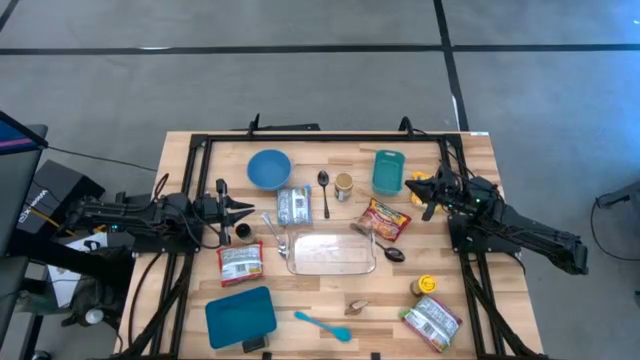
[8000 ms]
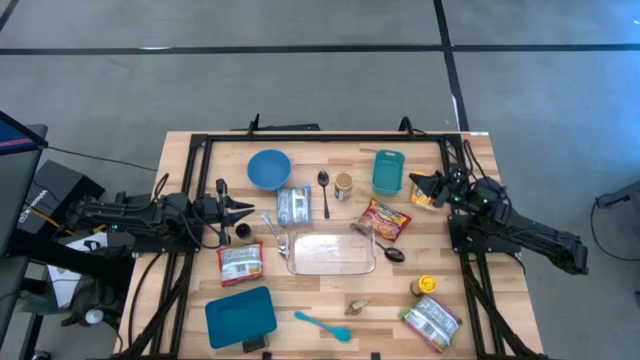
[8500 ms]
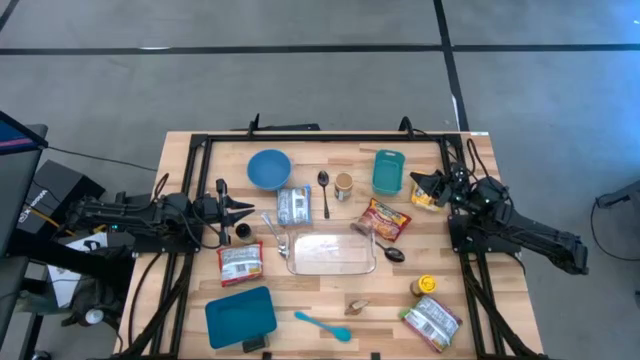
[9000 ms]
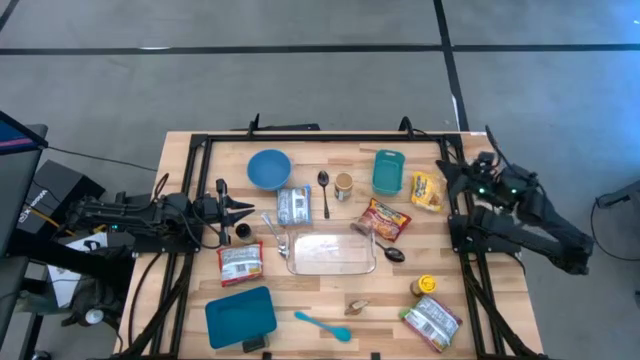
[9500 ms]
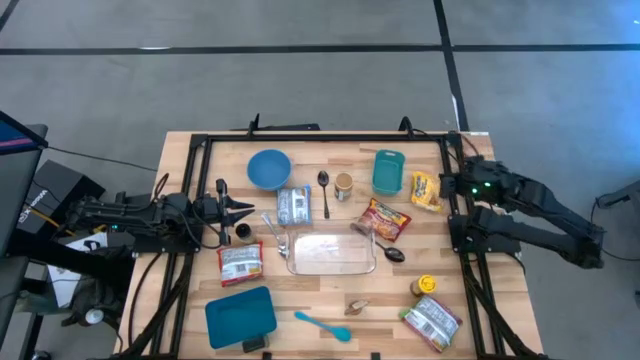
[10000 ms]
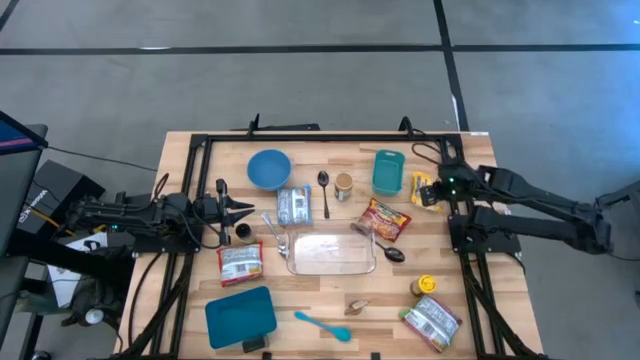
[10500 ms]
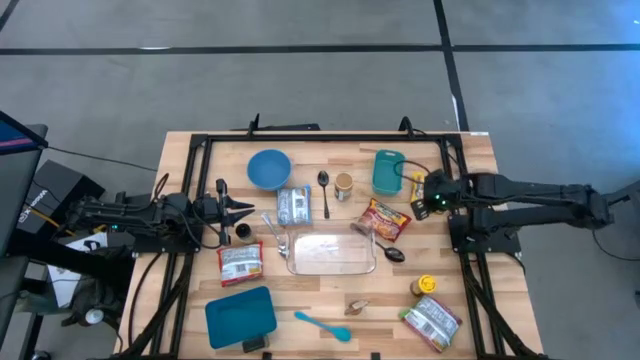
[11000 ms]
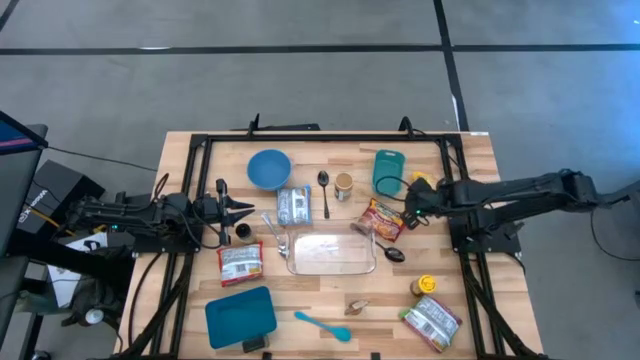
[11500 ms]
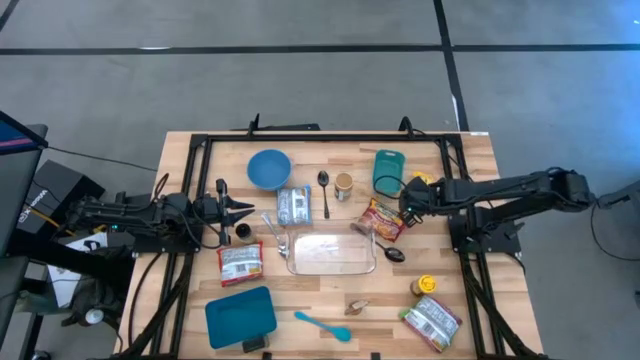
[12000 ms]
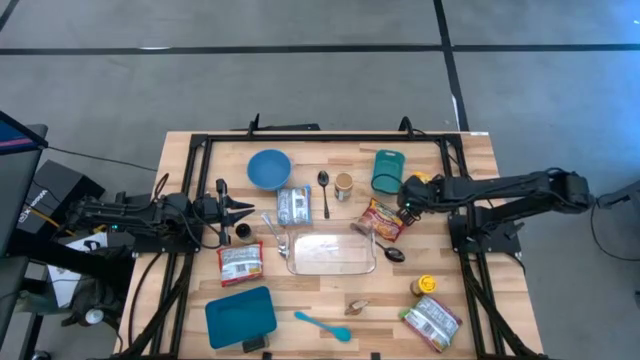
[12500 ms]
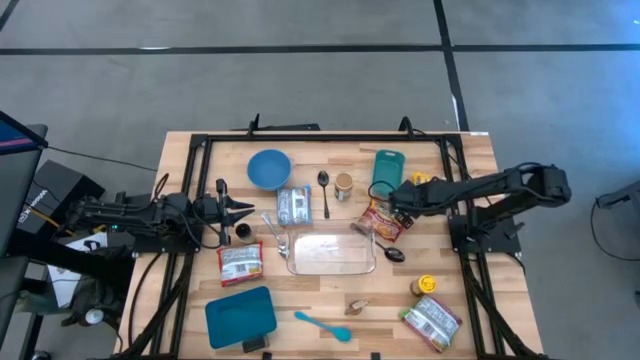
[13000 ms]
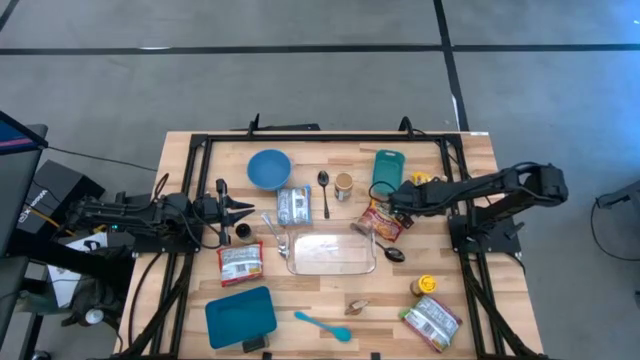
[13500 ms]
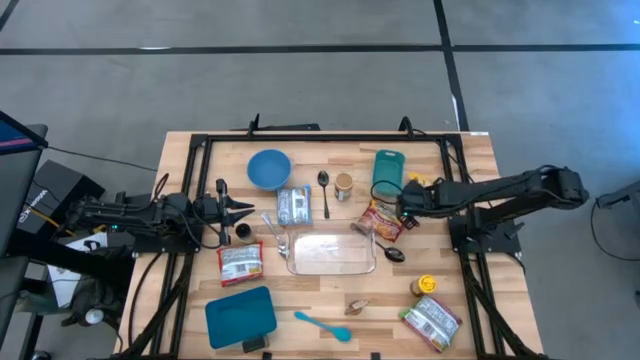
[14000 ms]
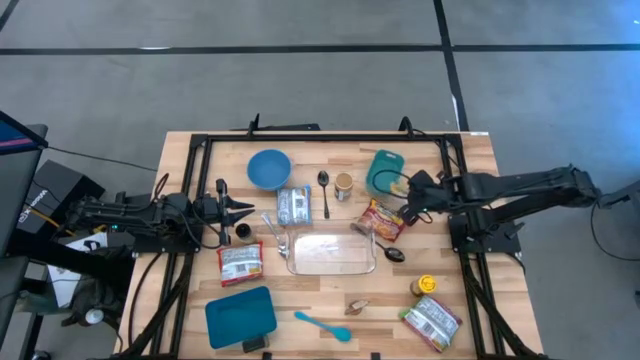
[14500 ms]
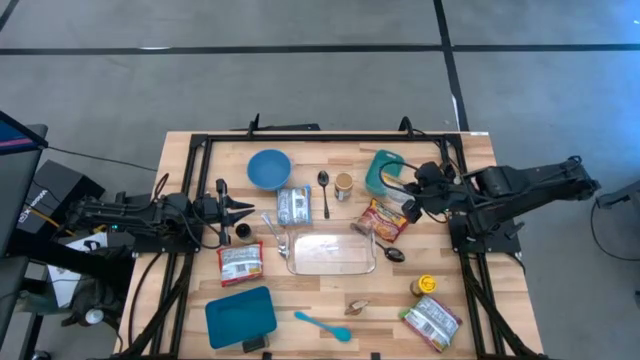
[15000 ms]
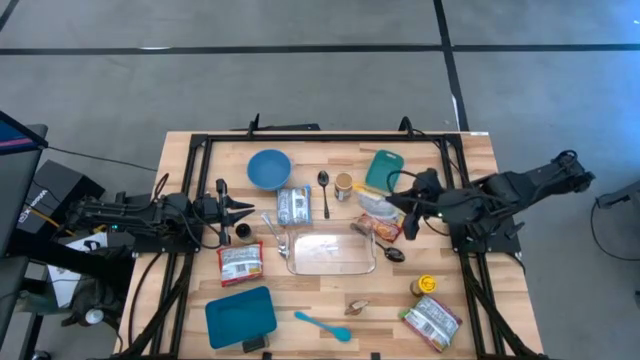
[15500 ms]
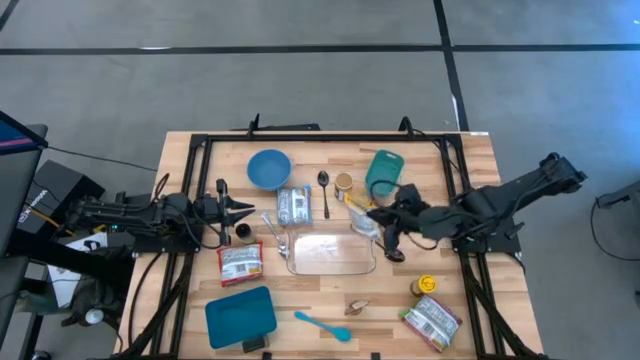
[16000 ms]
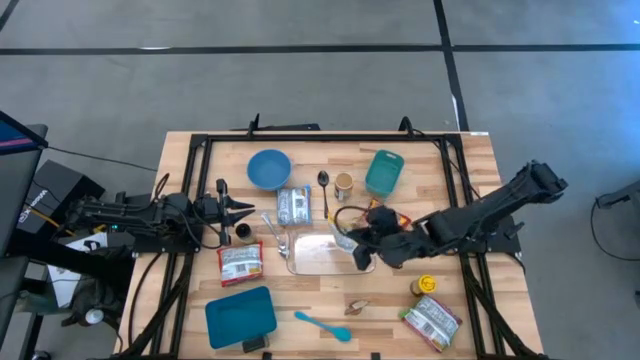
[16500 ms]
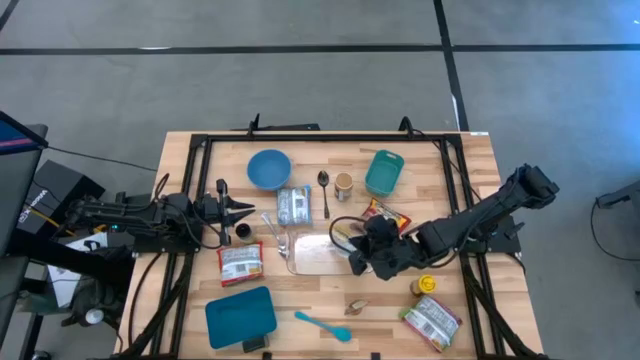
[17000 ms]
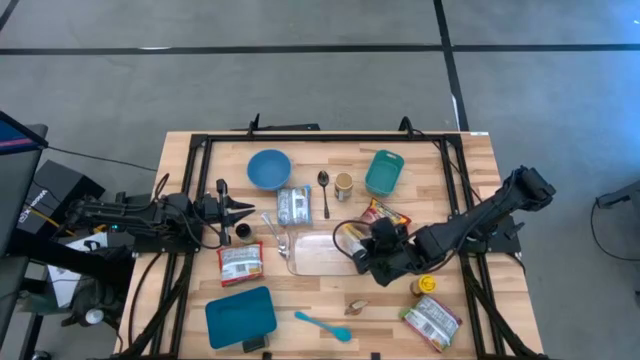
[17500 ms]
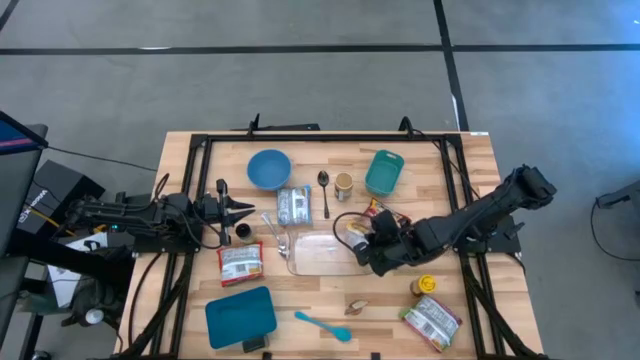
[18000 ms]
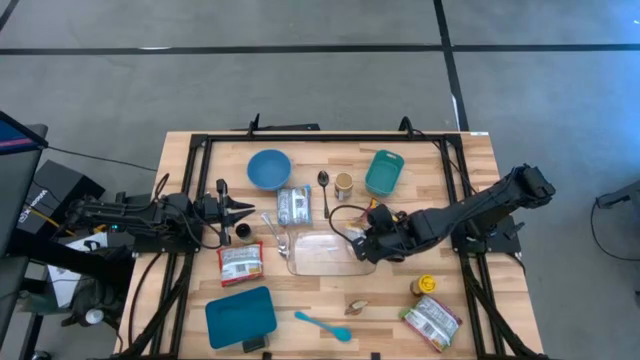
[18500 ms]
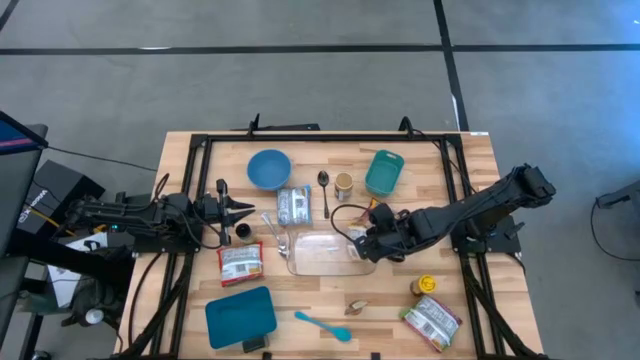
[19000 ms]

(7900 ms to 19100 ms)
Task: Pick & Place Food Item
Put the yellow noodle pack into the transparent bin

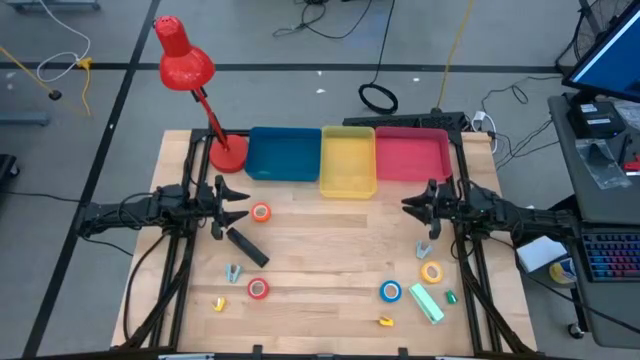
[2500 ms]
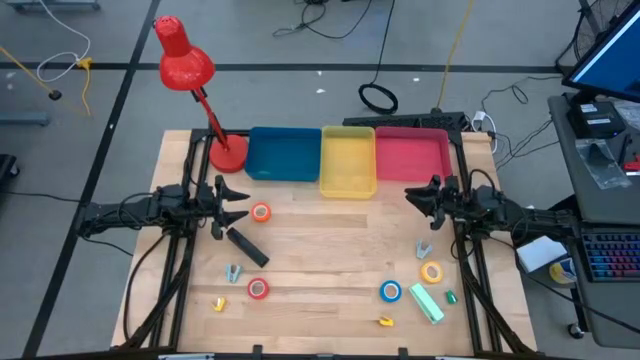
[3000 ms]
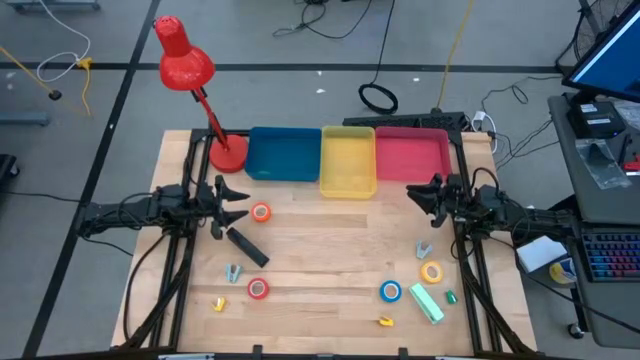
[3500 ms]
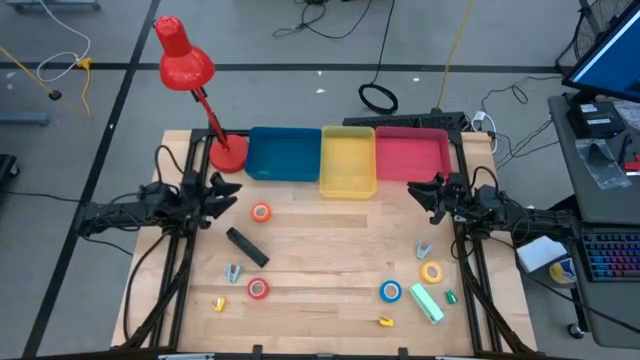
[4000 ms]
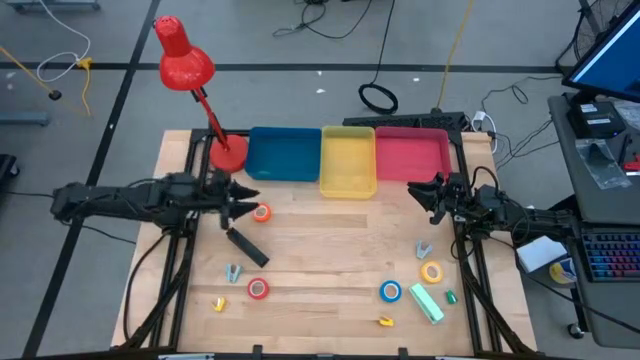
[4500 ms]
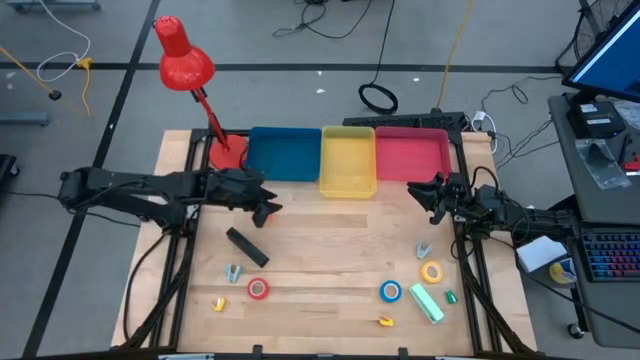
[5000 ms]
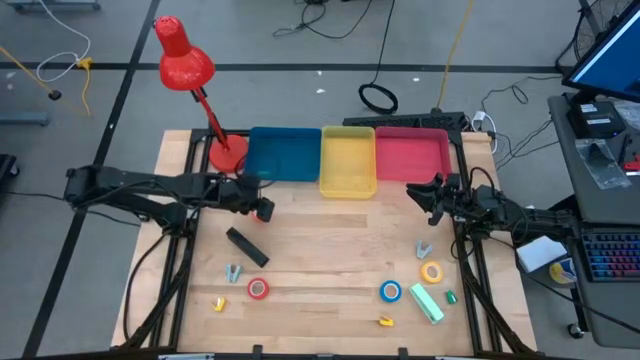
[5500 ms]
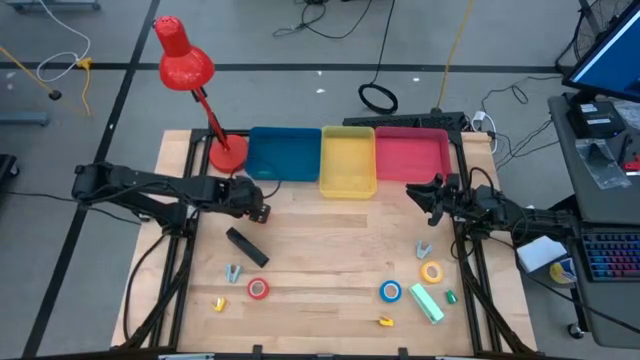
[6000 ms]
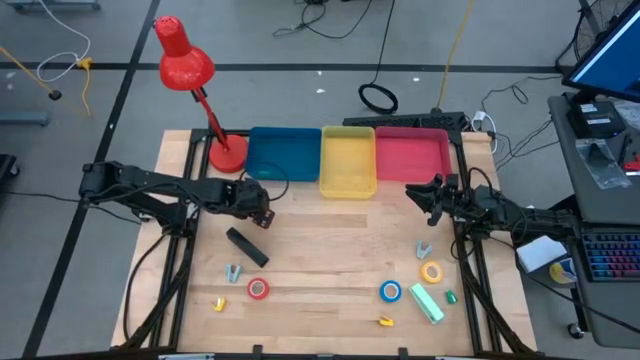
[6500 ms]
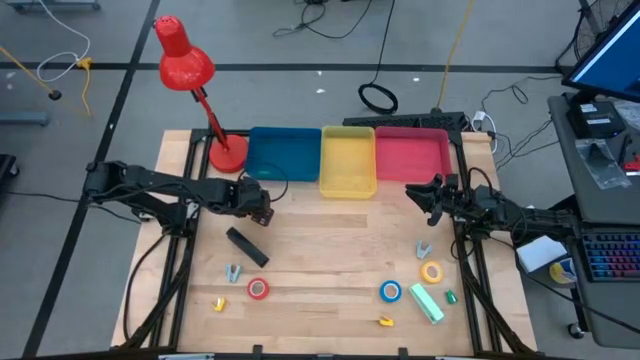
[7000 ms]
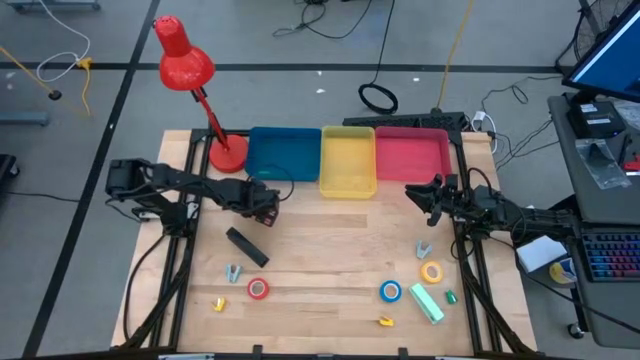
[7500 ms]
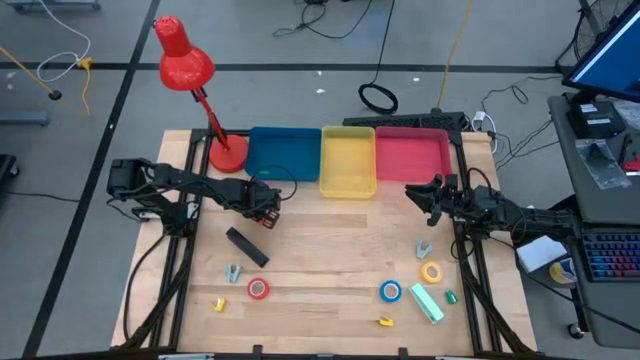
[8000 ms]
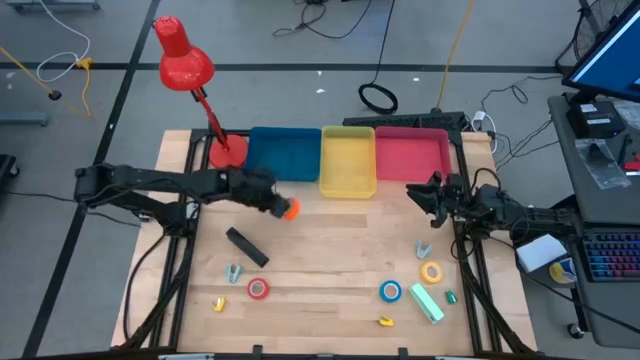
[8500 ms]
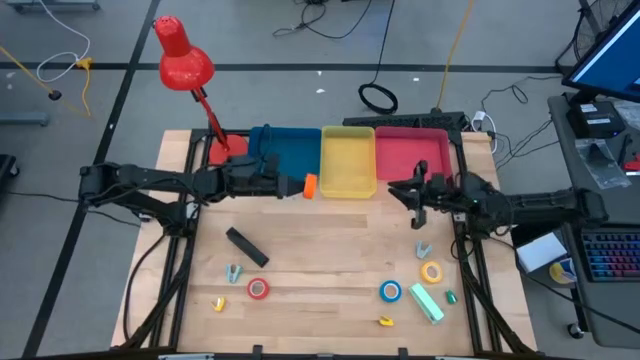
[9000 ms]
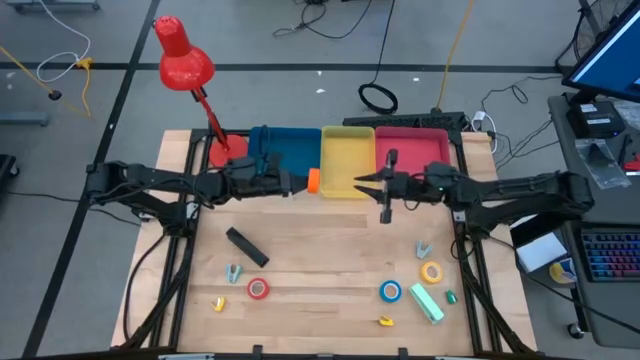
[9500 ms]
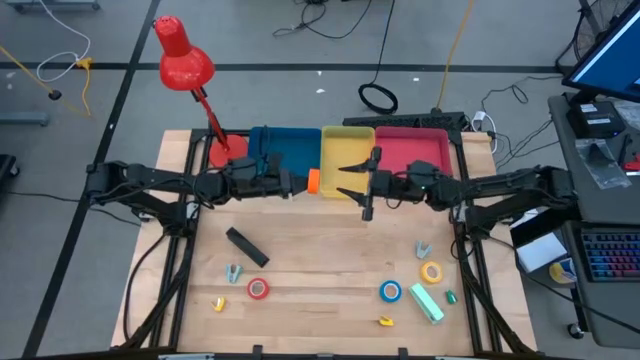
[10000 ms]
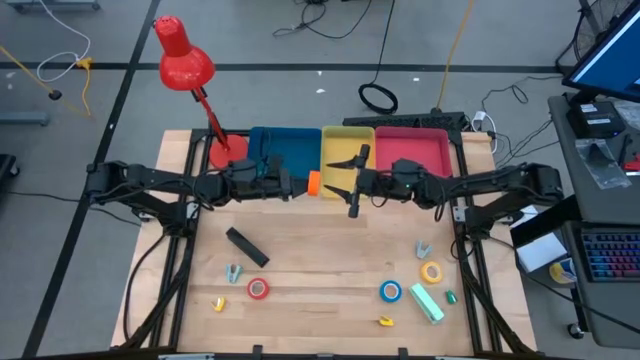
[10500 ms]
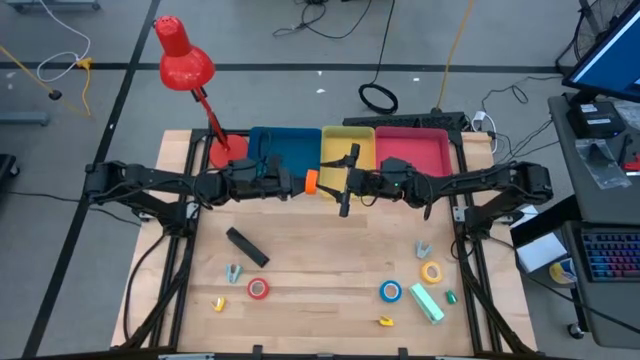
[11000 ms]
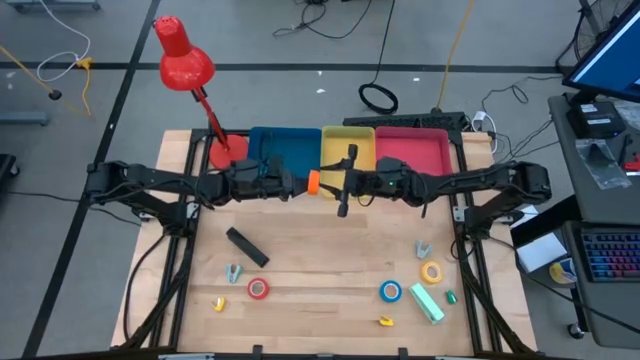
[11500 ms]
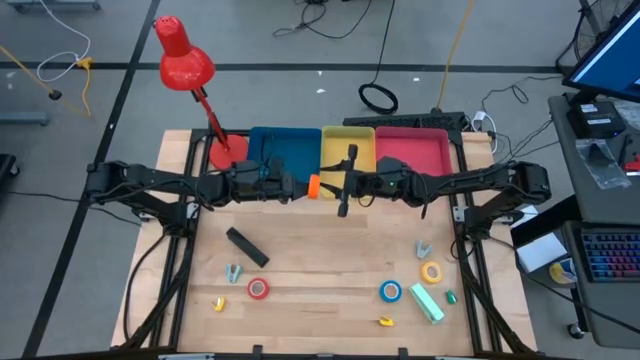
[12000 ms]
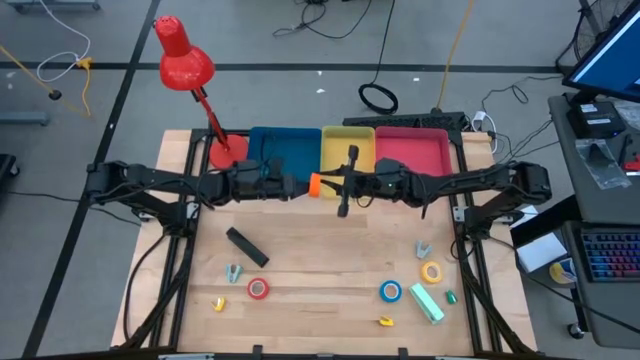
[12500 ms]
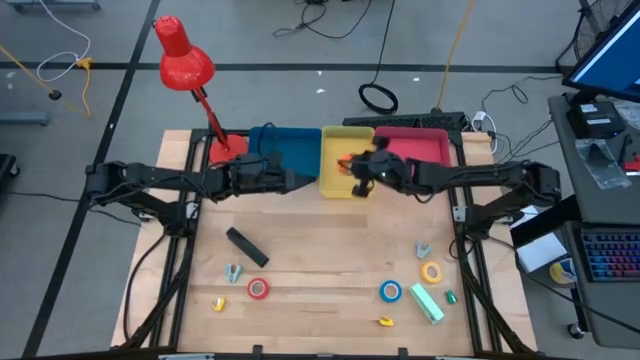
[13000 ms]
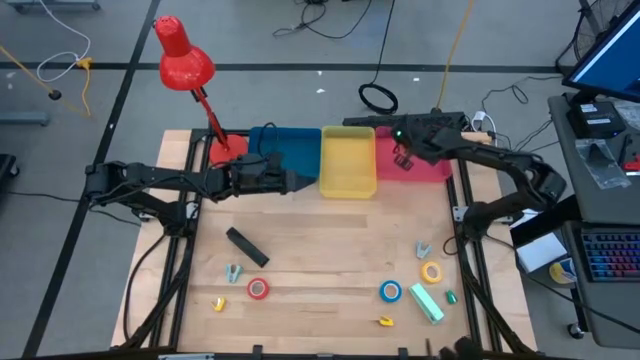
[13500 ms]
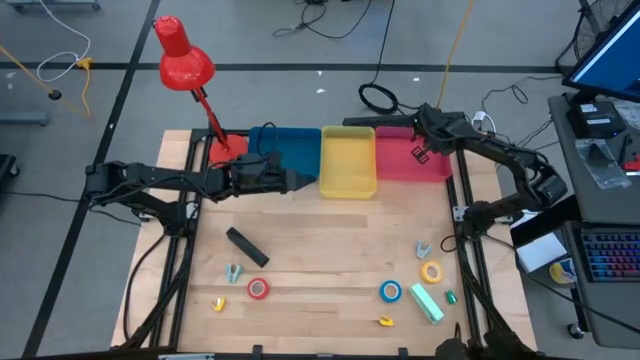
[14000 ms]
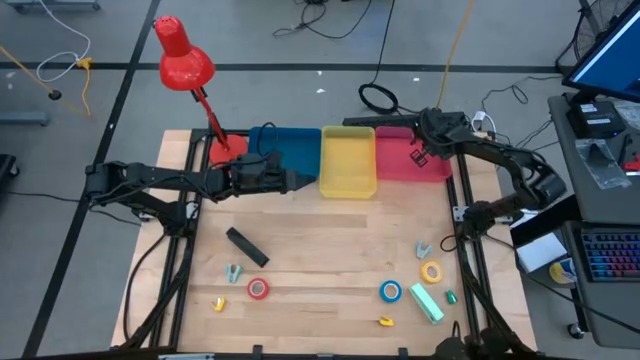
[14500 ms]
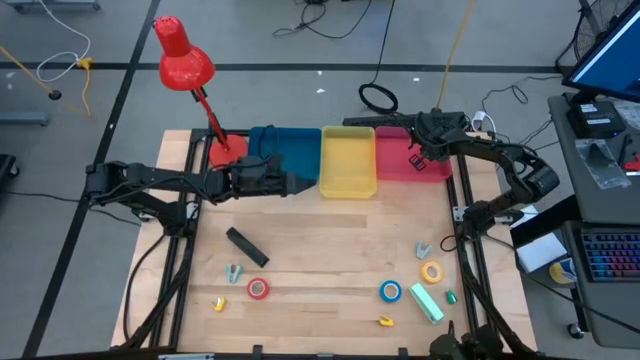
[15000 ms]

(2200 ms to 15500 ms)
Task: Pick and place Stapler, Stapler remover, tape
Put the orange tape into the red bin
